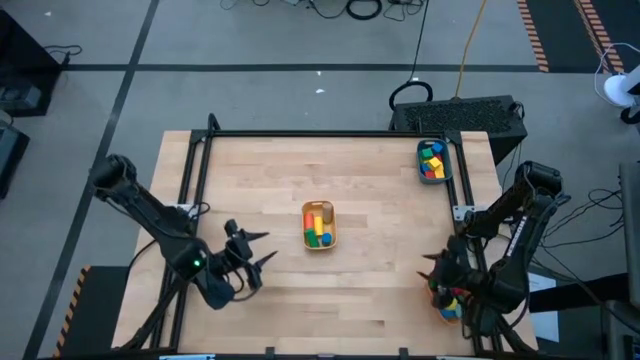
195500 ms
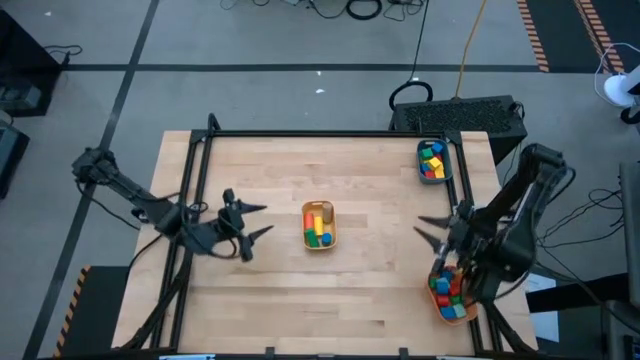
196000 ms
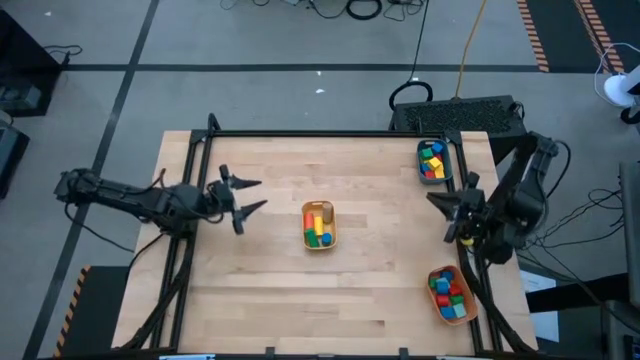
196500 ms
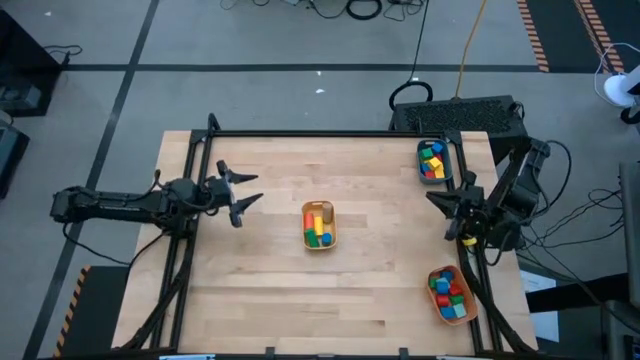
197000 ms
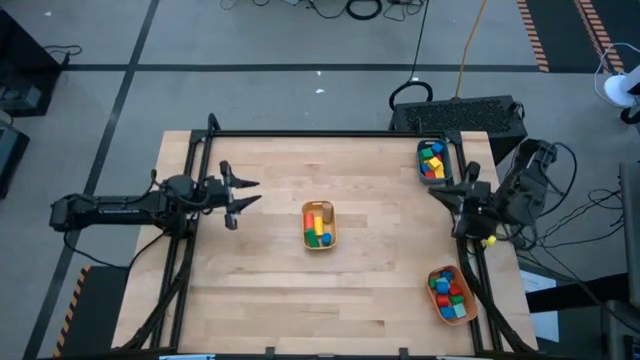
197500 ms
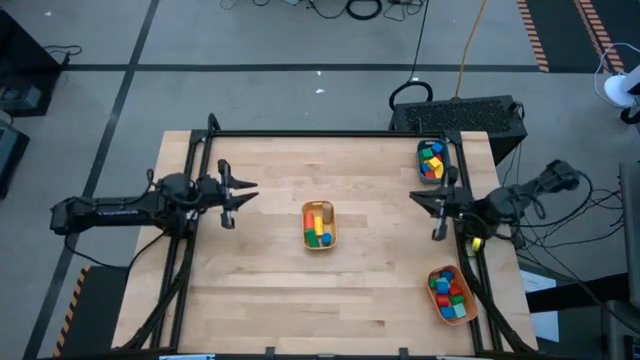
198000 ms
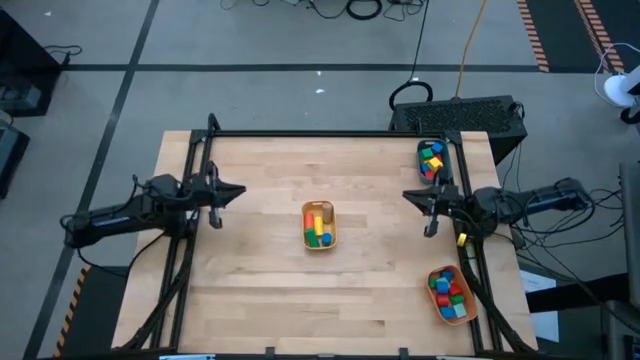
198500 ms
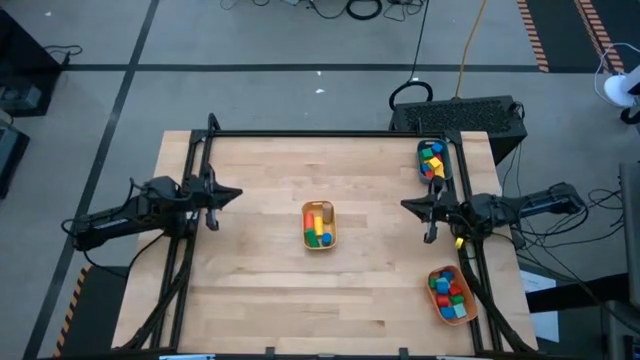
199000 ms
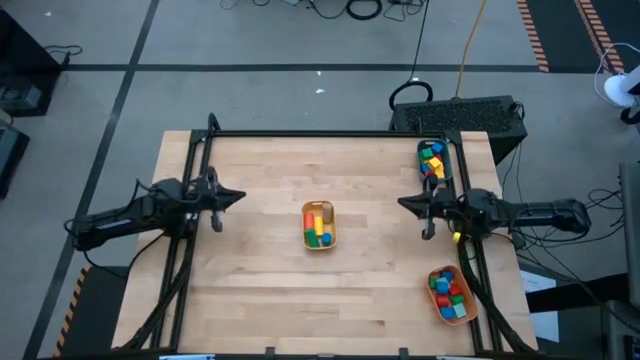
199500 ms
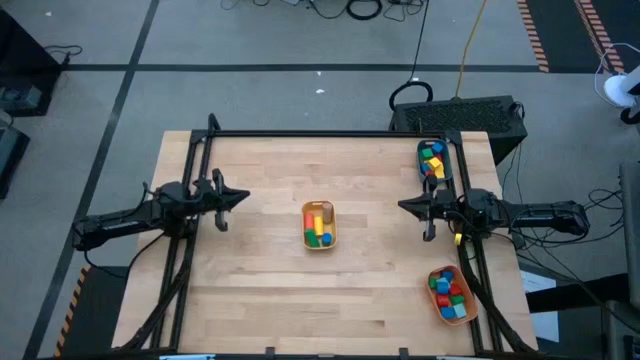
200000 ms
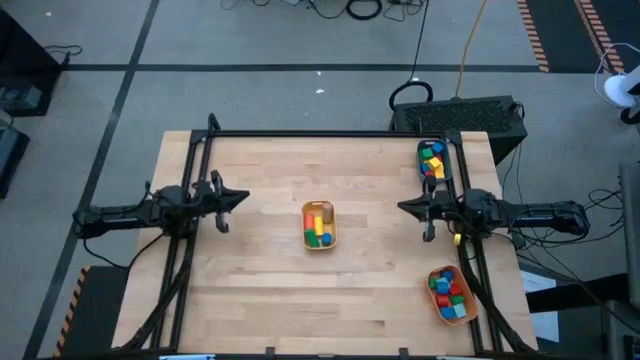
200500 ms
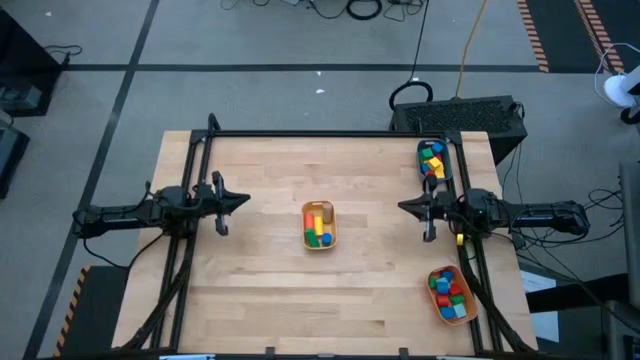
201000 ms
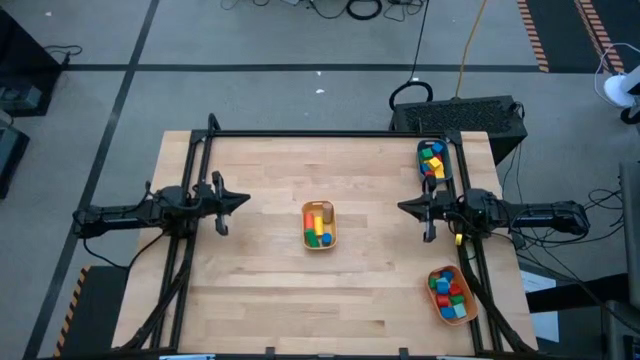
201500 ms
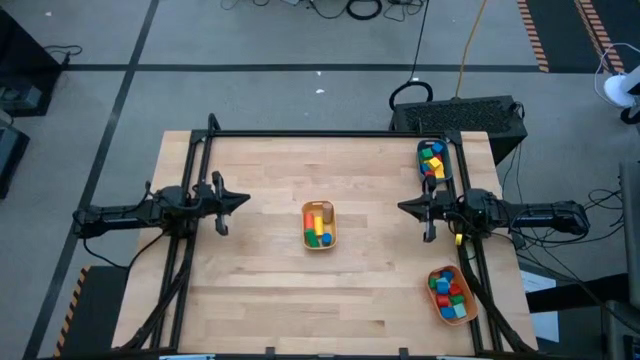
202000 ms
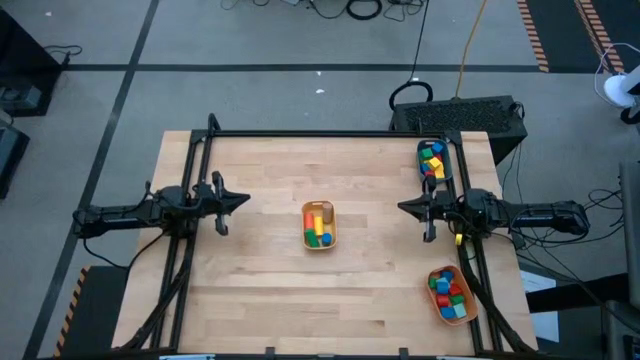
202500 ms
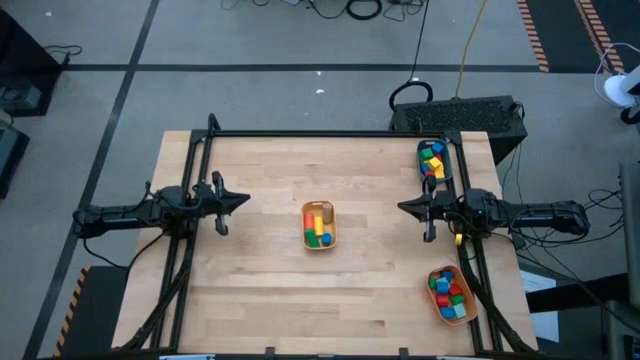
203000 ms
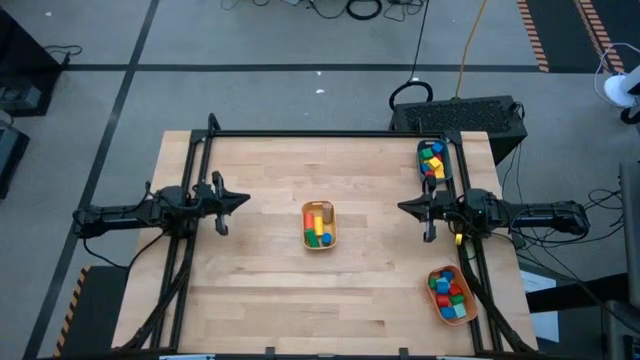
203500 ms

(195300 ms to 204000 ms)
Task: Sort blocks by size
Return to Home Position

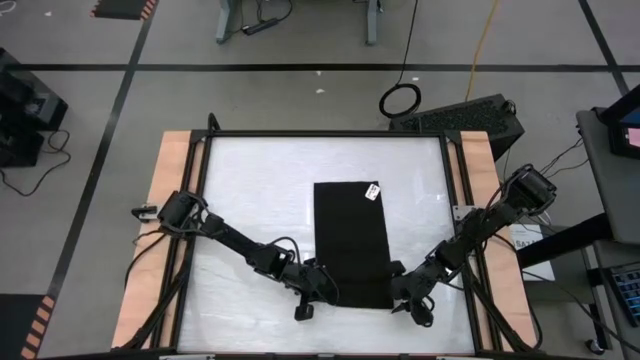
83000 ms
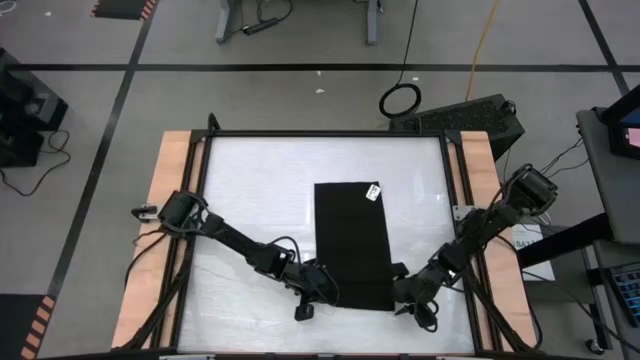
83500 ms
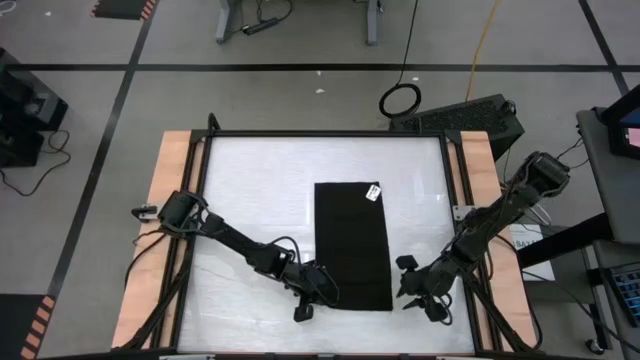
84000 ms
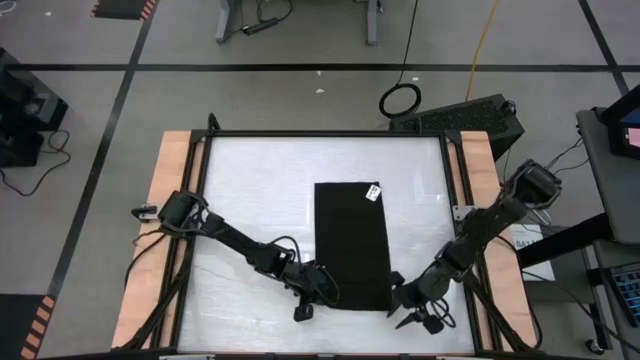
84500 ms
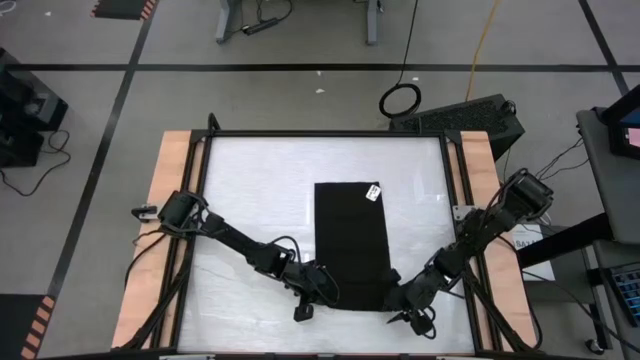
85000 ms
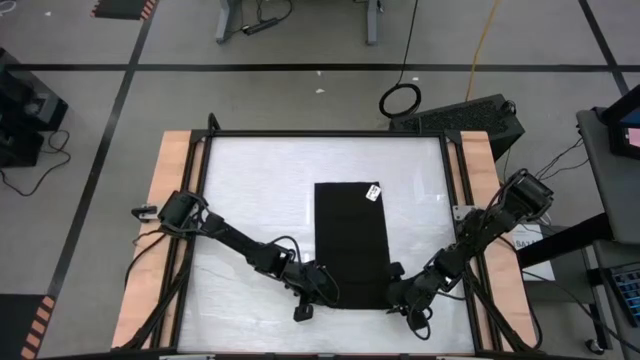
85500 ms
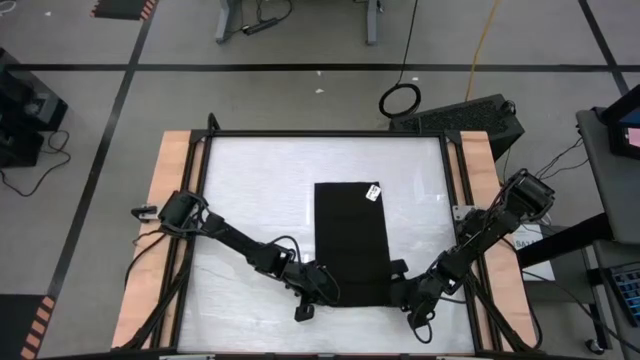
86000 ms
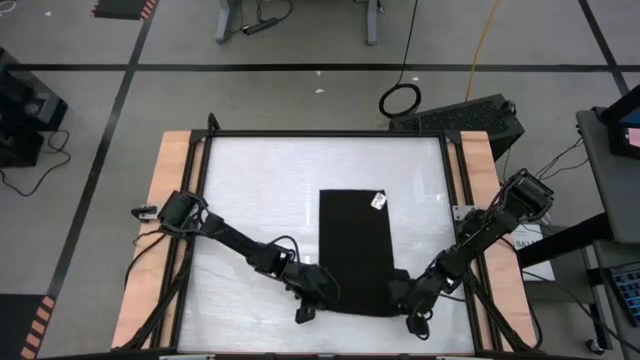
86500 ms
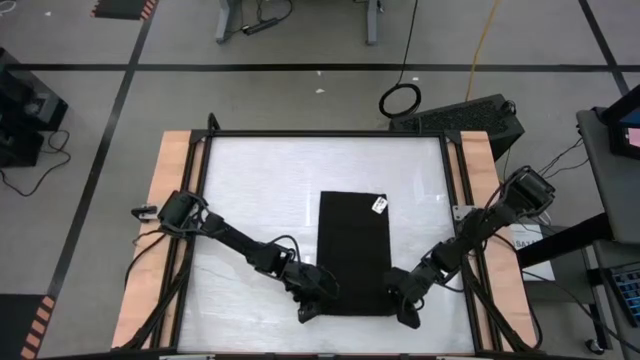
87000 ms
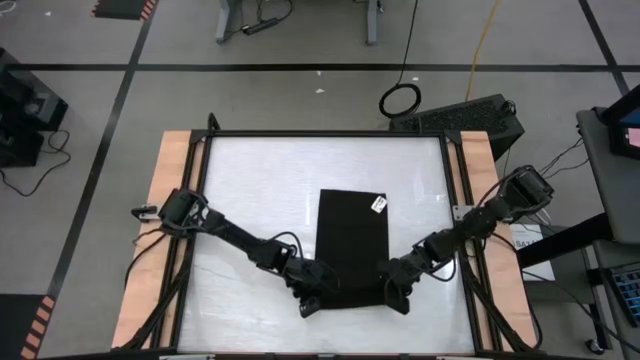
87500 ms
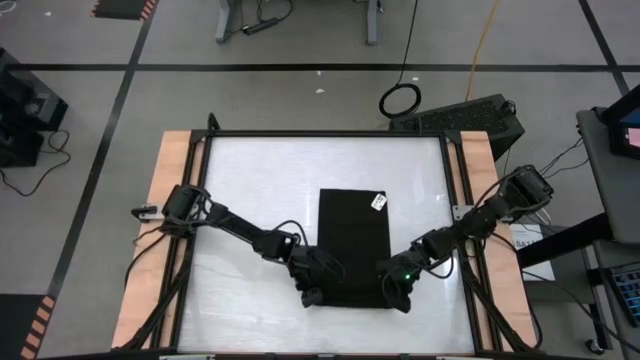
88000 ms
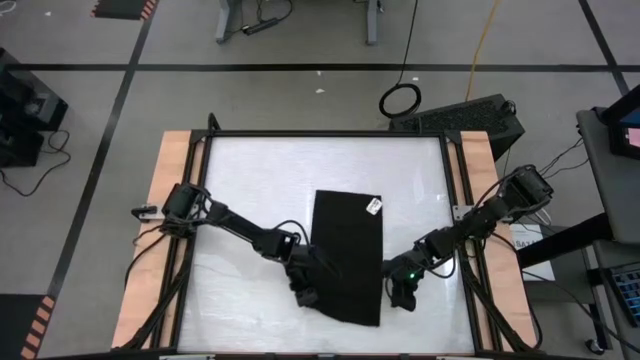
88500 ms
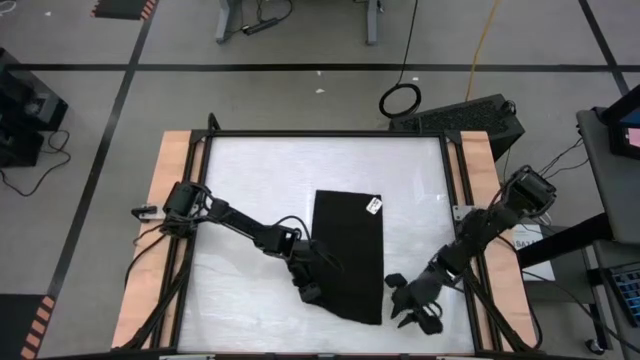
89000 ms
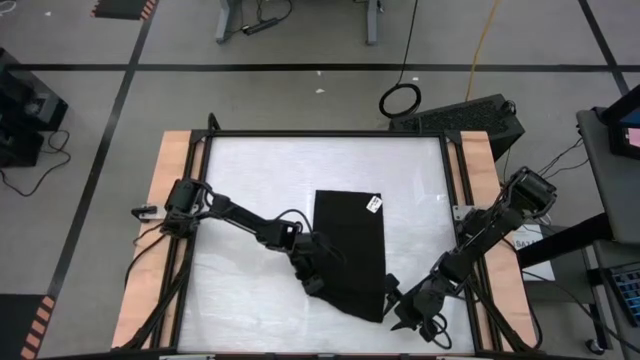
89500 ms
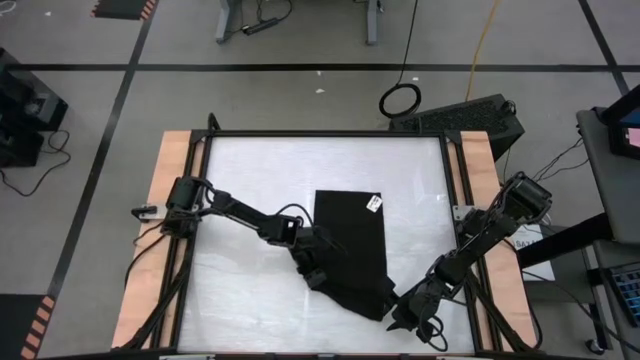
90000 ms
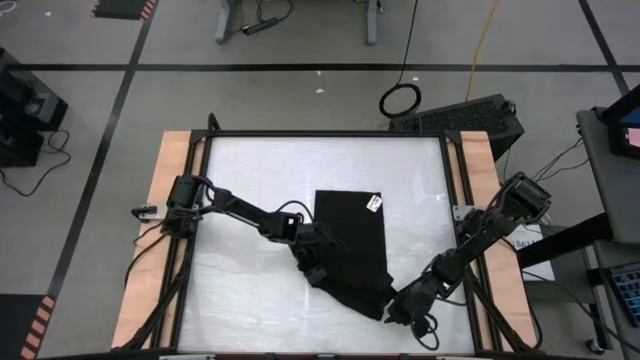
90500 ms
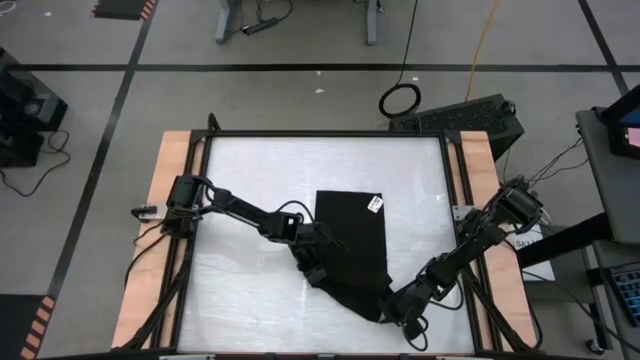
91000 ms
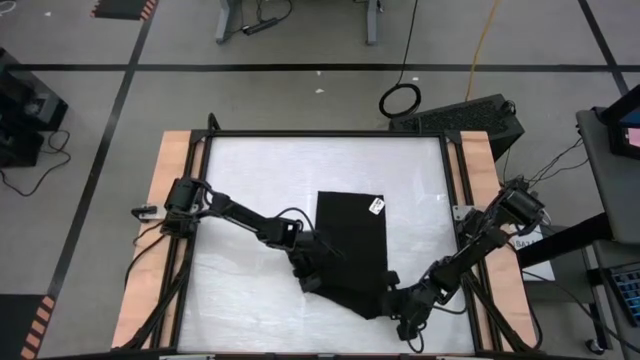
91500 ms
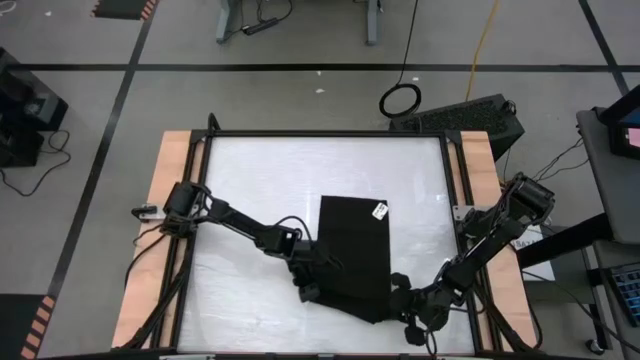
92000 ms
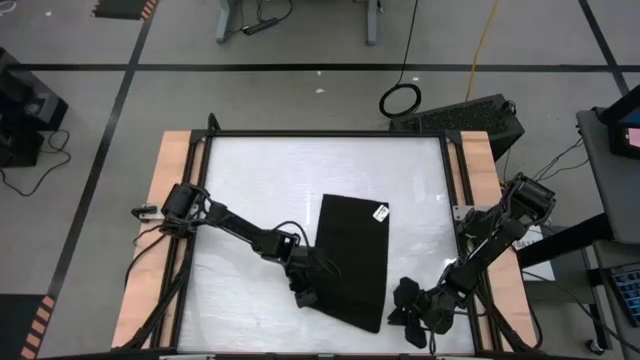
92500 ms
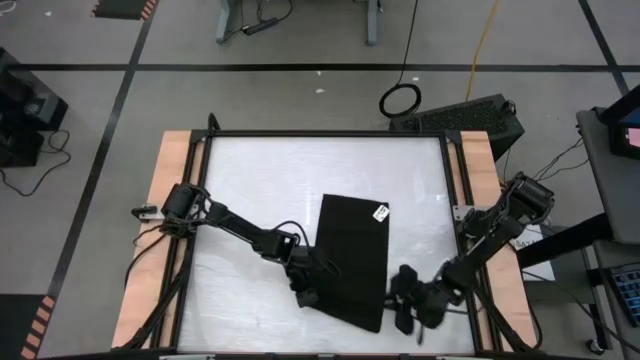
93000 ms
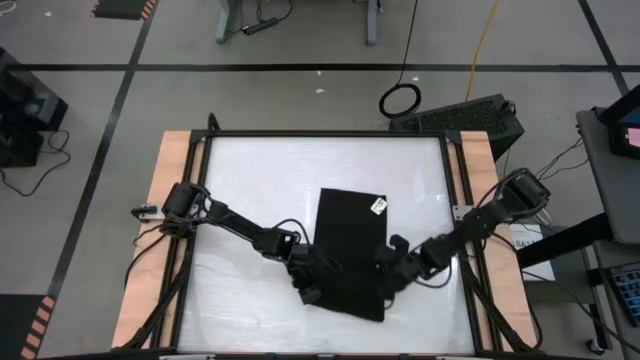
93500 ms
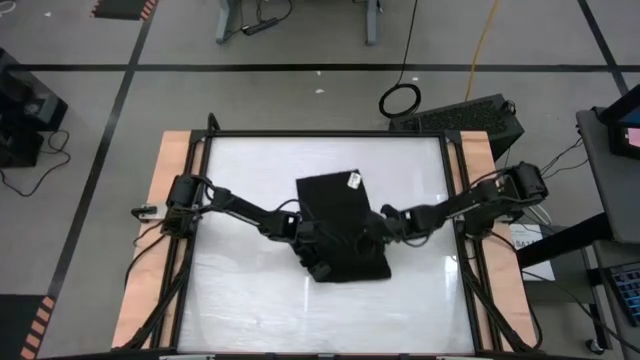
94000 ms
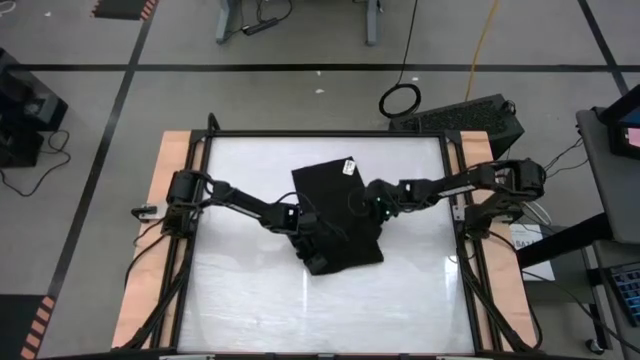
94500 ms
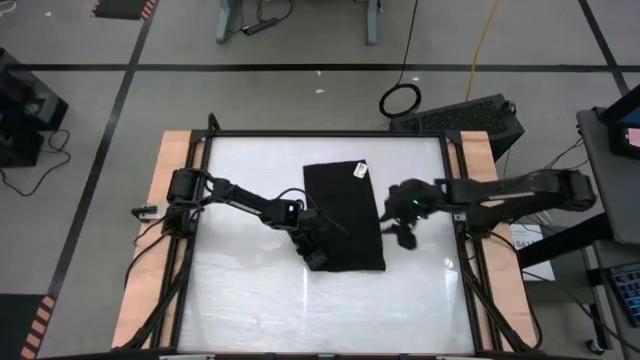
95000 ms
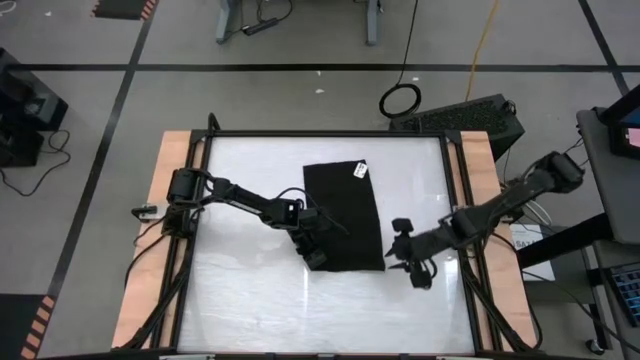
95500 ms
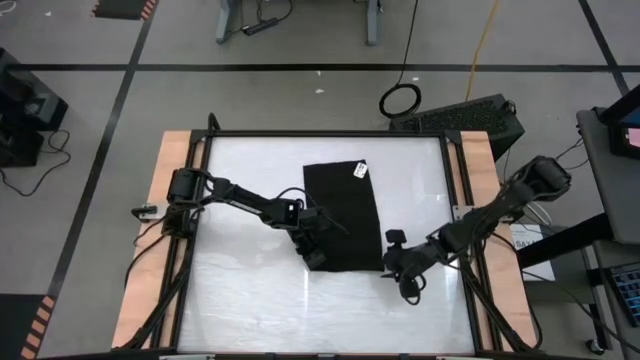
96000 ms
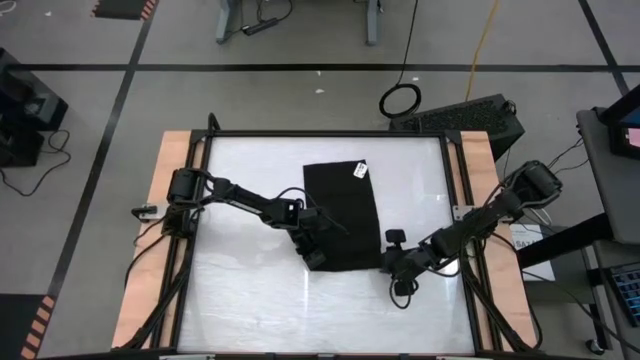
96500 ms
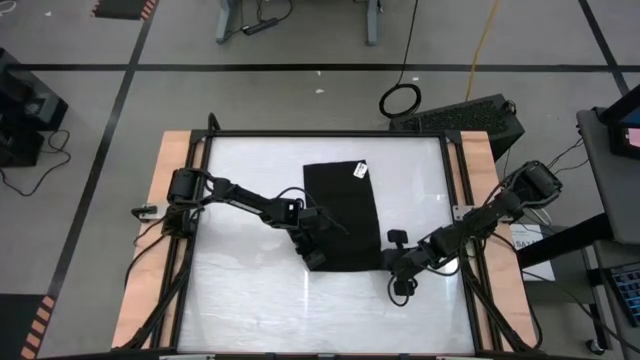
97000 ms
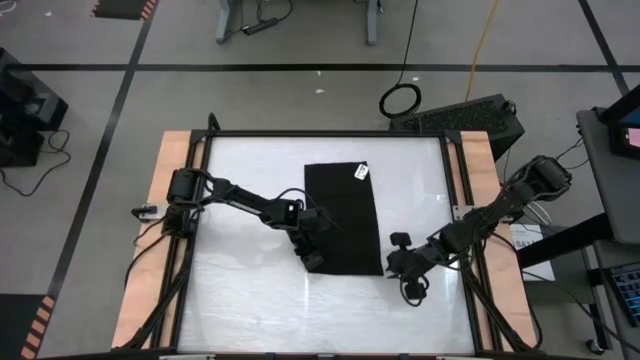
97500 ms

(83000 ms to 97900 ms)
Task: Roll towel into tight, uniform cylinder
Roll the black towel
